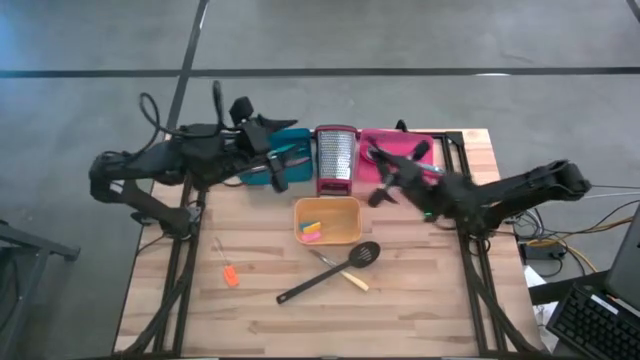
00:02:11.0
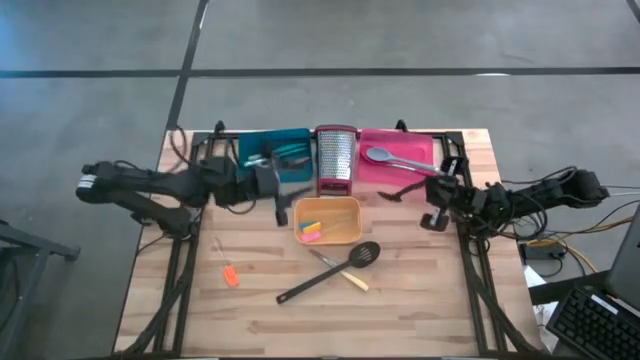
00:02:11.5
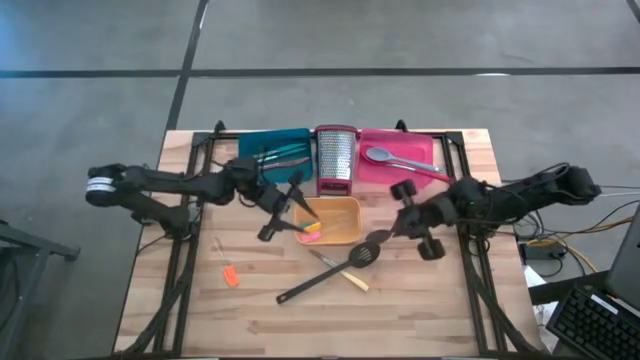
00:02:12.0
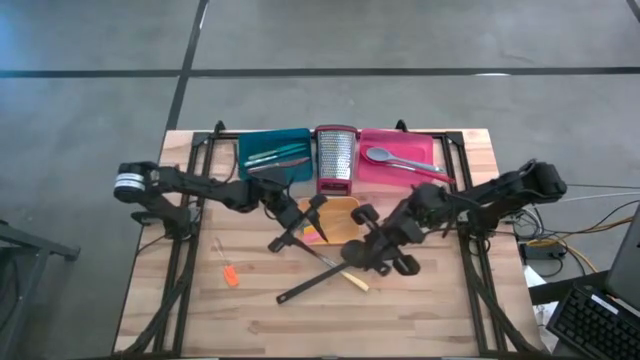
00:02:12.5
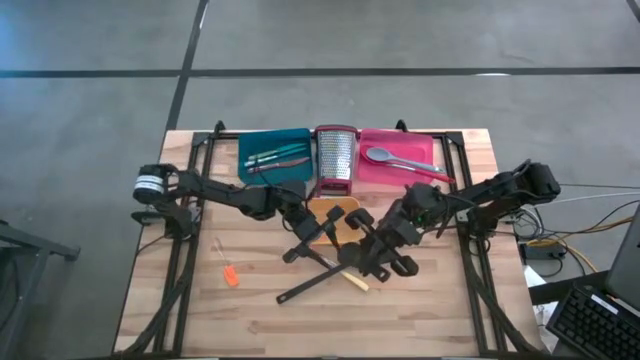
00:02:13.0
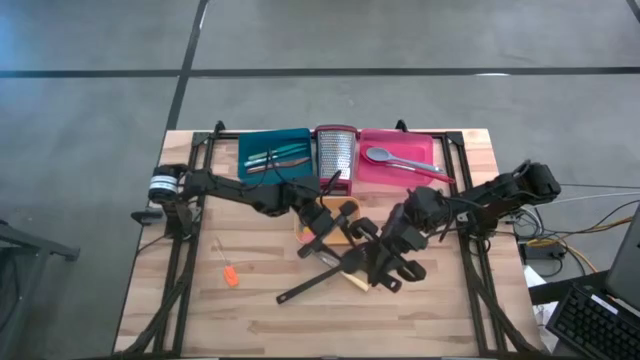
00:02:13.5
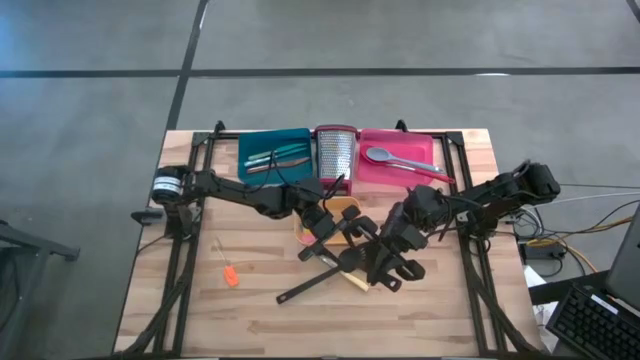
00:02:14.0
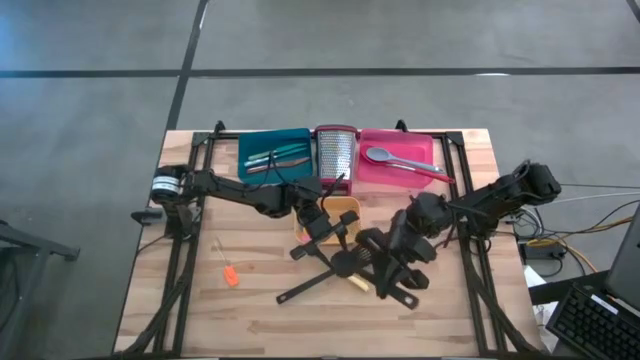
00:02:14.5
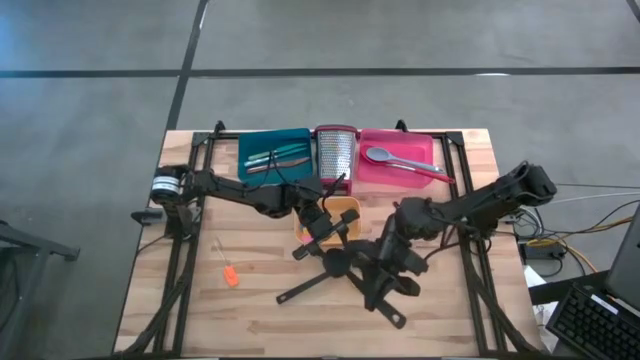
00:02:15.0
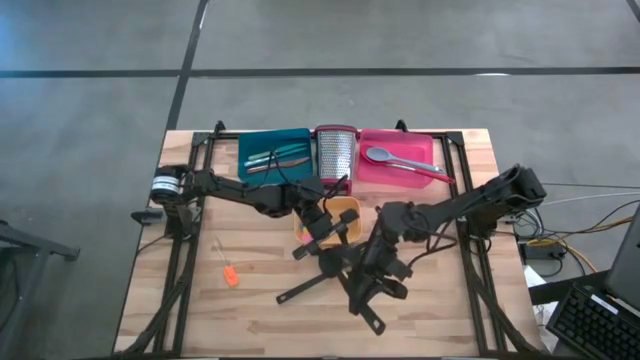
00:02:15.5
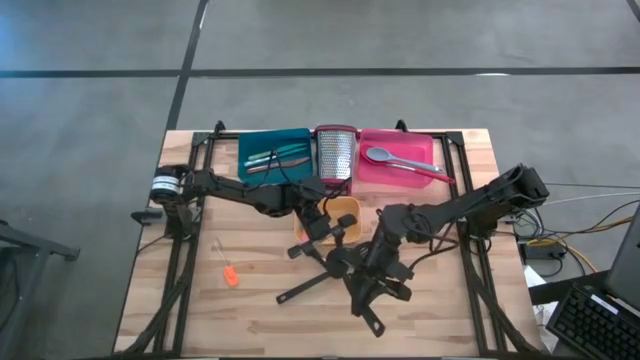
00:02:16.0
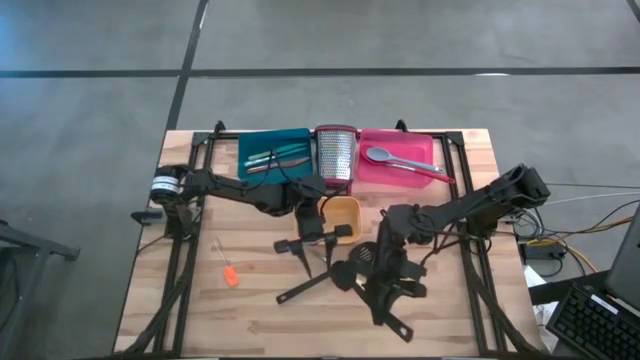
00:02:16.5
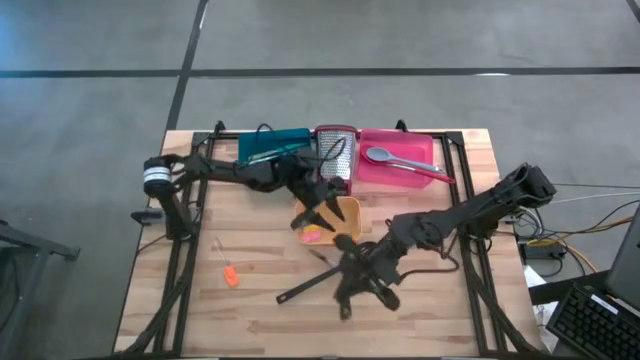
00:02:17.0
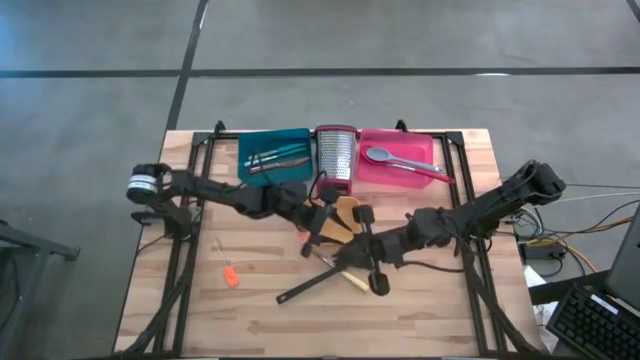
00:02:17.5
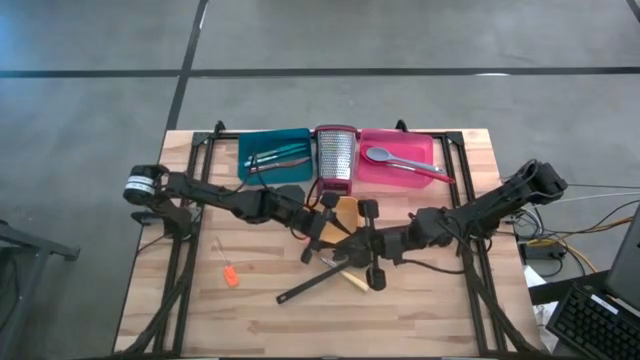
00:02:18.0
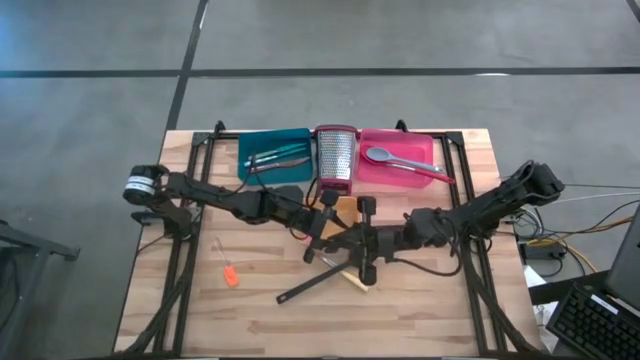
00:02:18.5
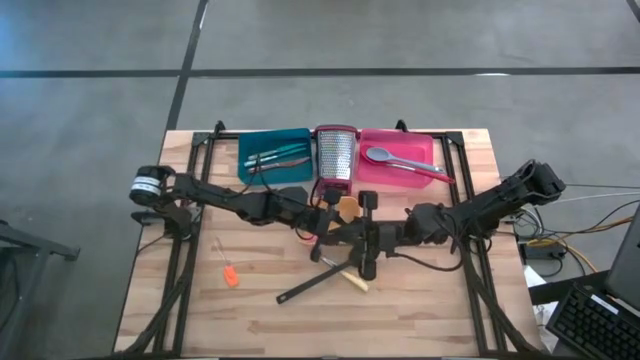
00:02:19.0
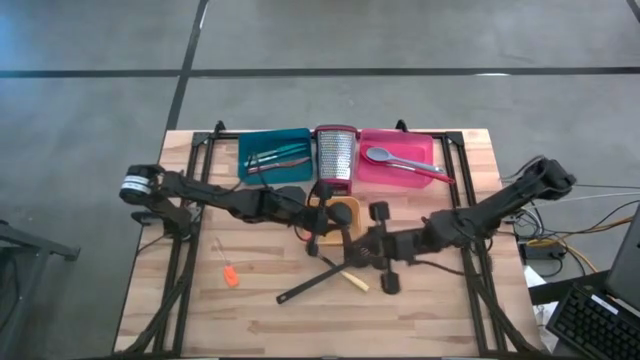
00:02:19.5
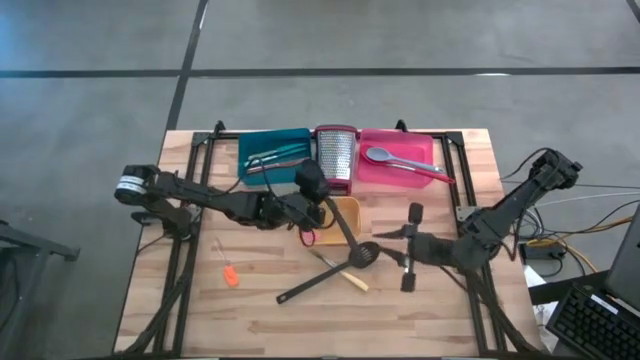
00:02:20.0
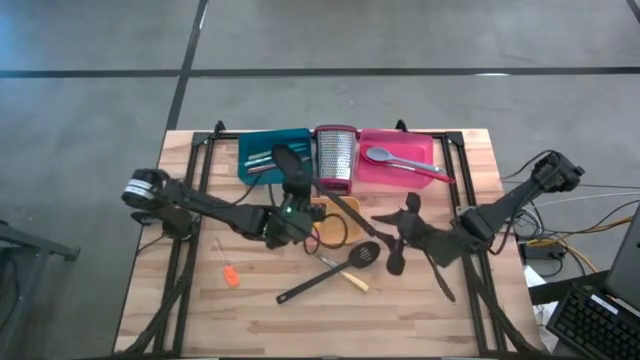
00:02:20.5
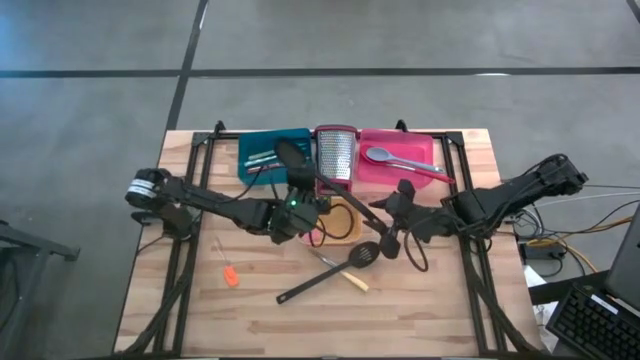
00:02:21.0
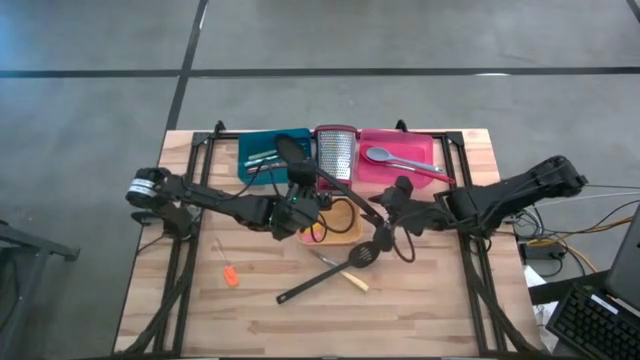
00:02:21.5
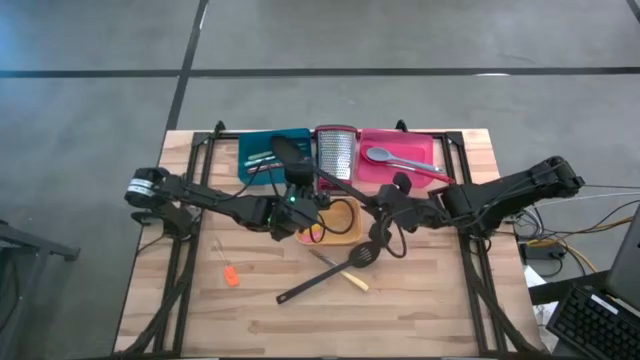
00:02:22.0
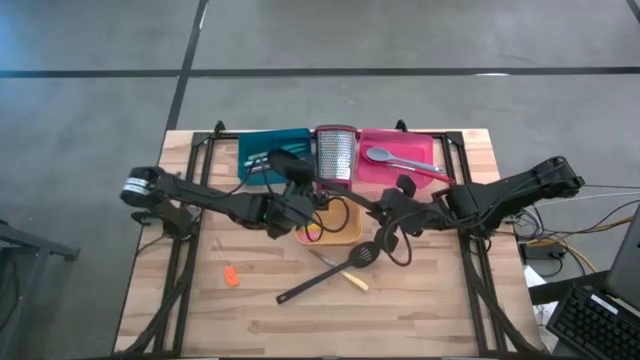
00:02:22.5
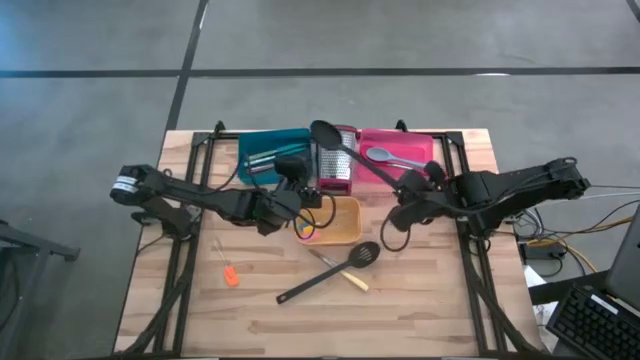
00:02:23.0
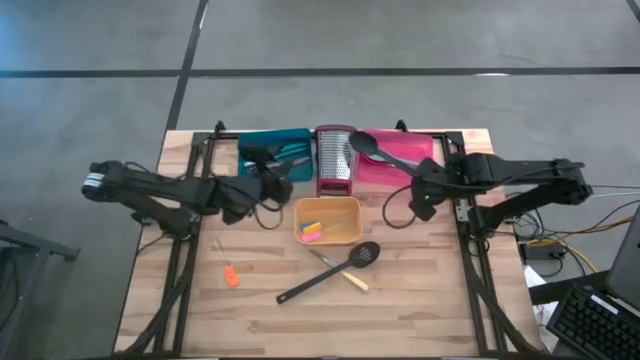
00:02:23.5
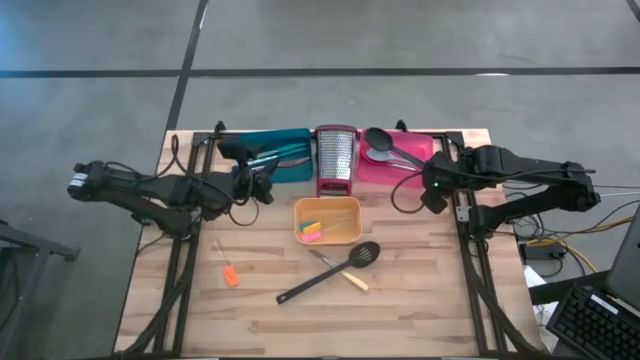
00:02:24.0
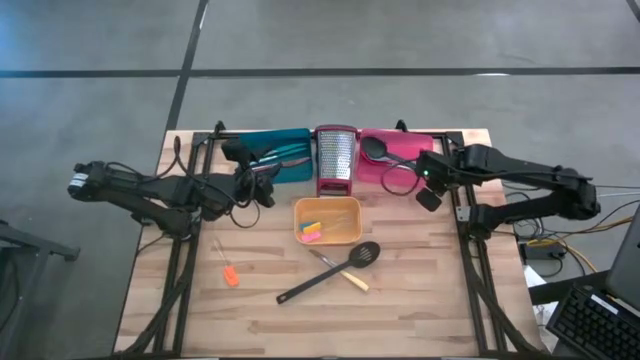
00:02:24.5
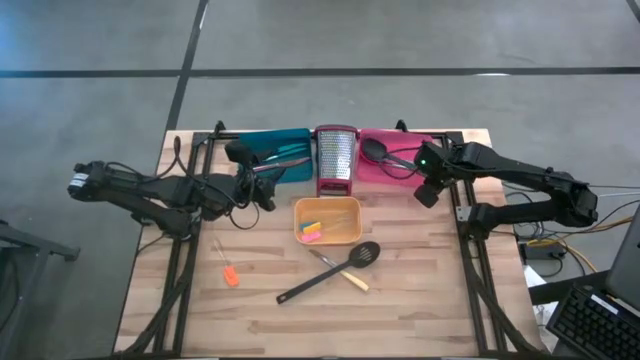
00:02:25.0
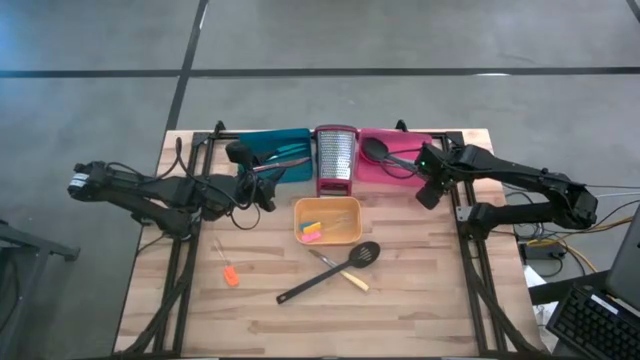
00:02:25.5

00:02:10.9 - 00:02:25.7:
Task: Pick & Place Kitchen Items
Put the black serving spoon into the pink bin

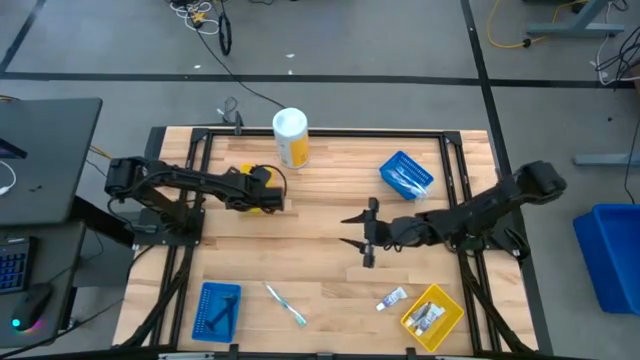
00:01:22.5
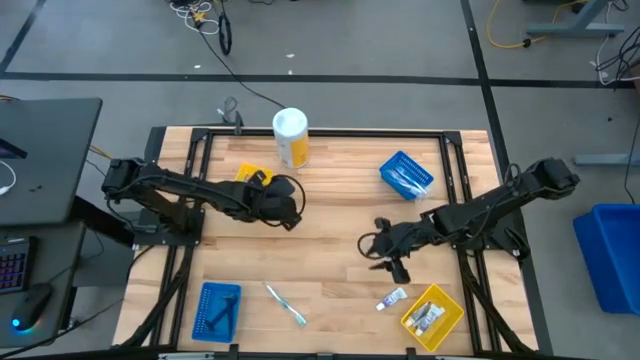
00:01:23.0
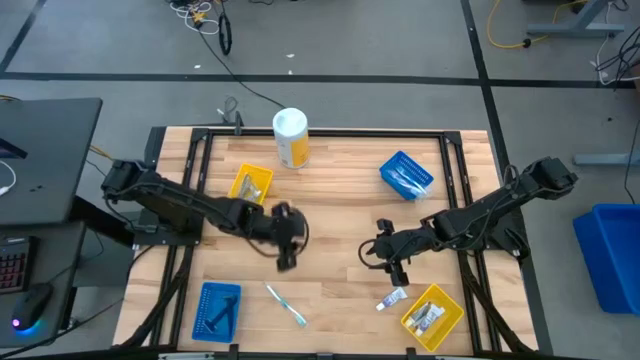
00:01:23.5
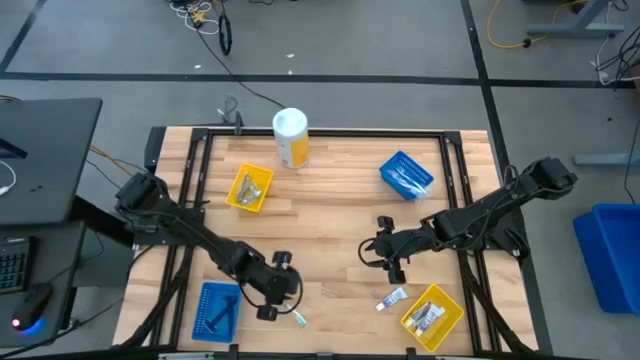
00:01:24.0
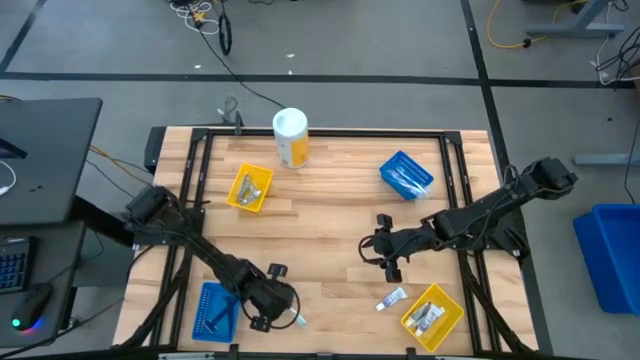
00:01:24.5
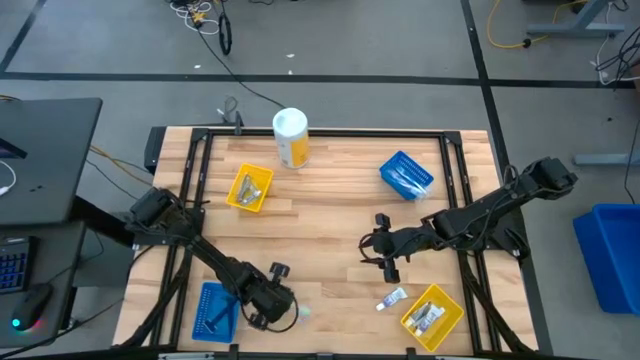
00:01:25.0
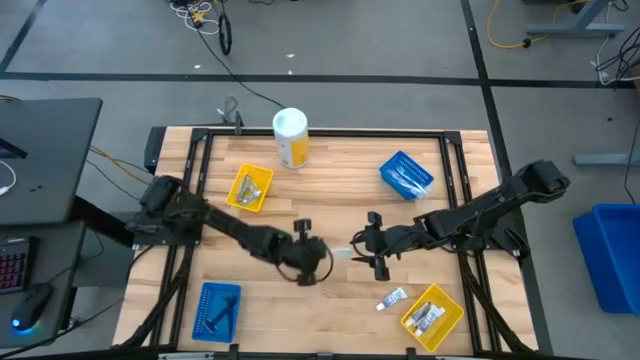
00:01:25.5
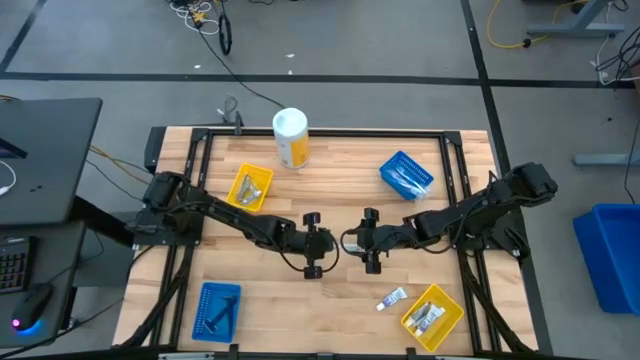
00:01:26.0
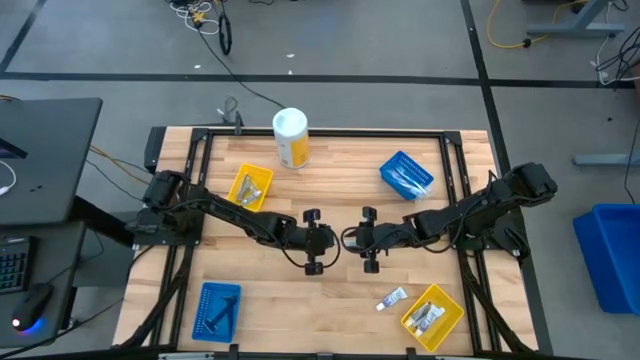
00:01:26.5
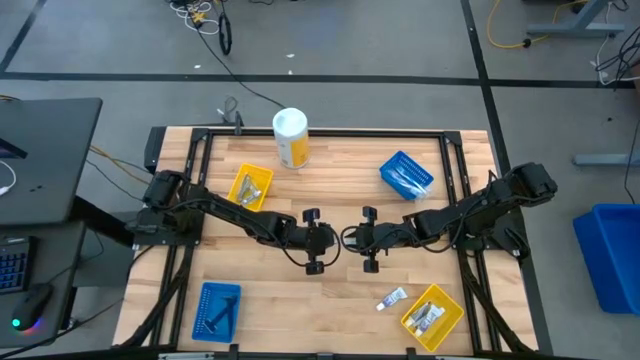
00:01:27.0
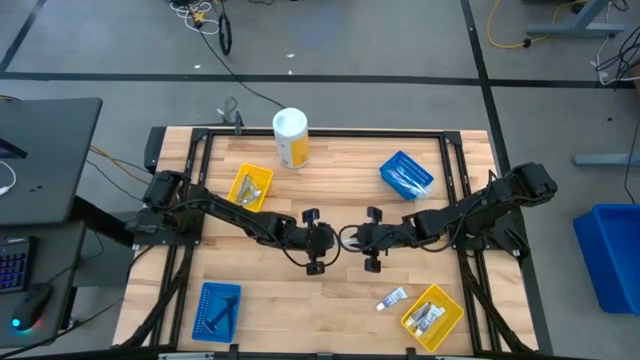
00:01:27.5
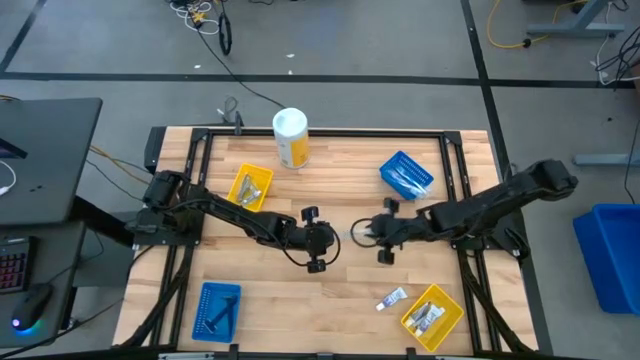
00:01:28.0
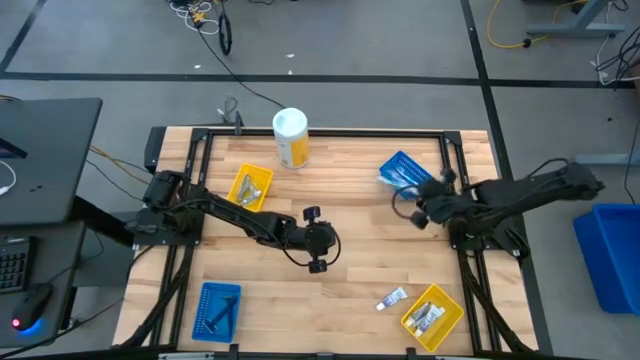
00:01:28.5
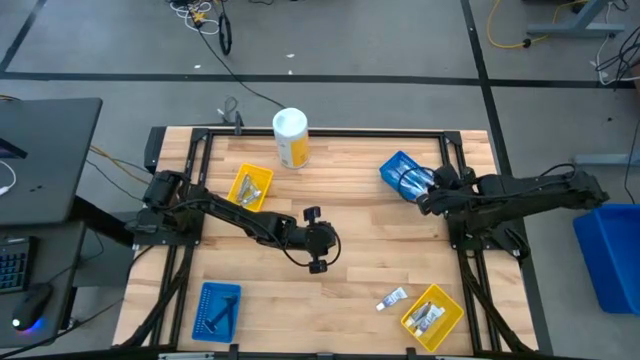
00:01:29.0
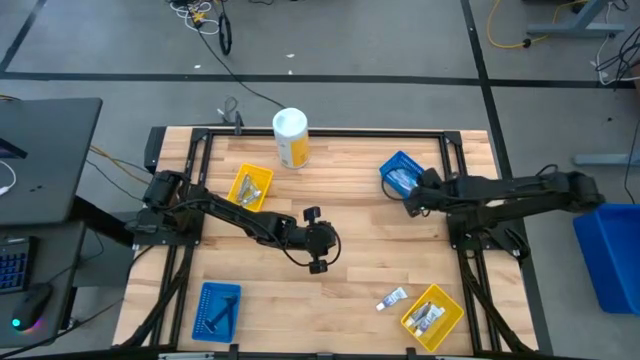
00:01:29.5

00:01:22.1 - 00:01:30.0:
Task: Pick & Place Travel size toiletries
Put the green toothbrush into the top blue bin
